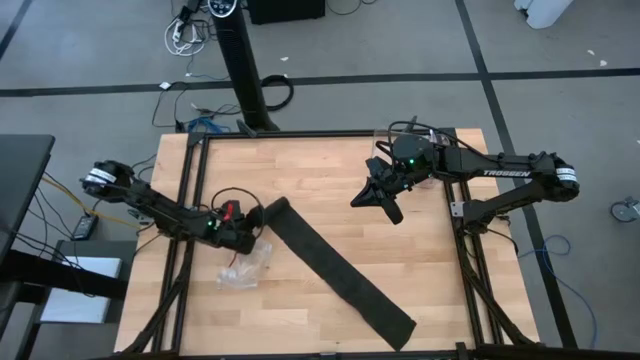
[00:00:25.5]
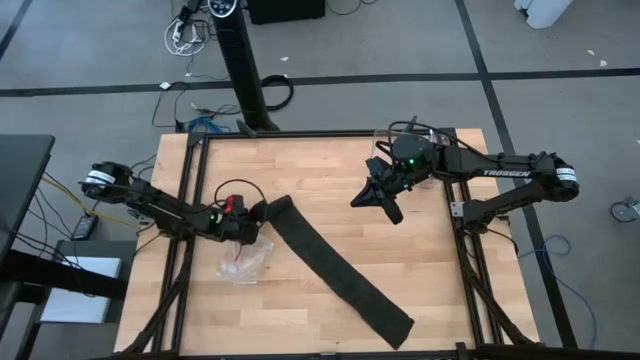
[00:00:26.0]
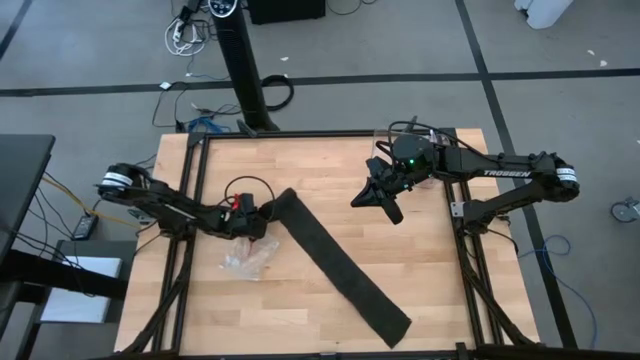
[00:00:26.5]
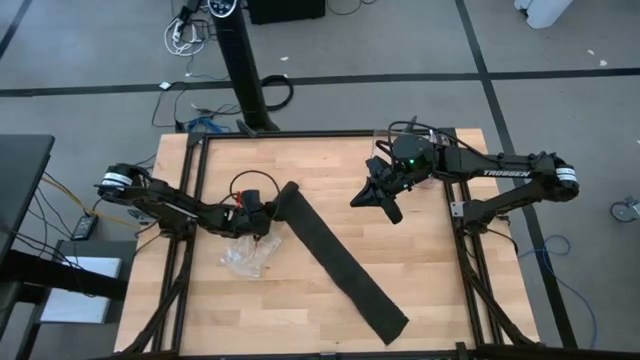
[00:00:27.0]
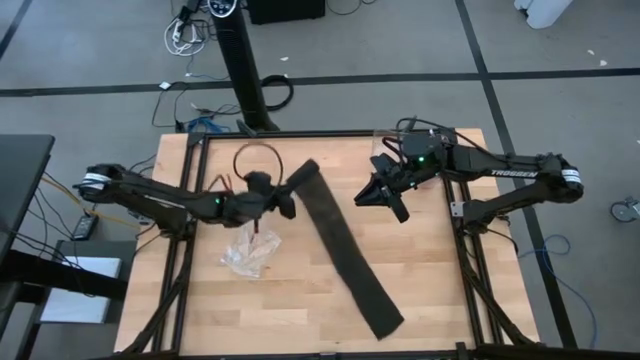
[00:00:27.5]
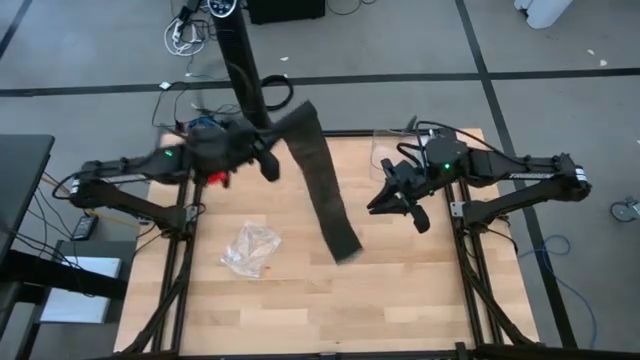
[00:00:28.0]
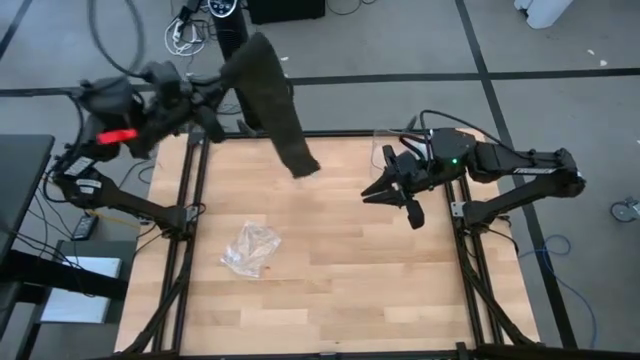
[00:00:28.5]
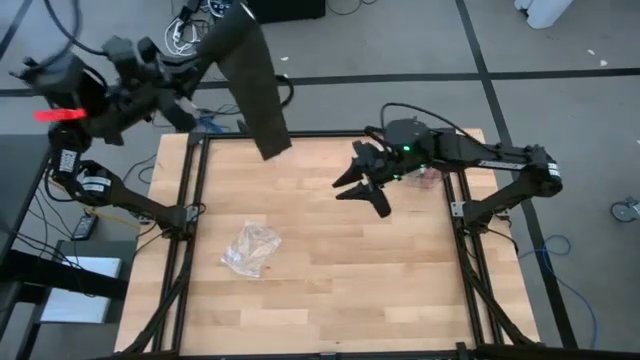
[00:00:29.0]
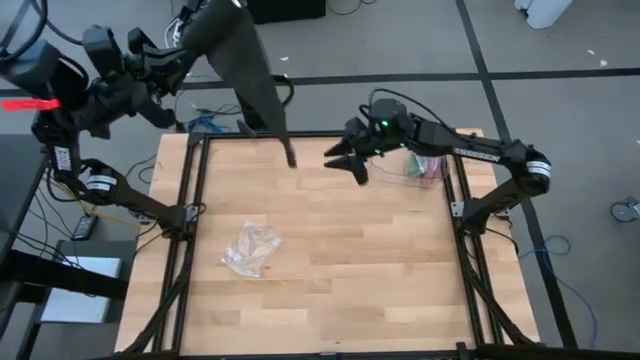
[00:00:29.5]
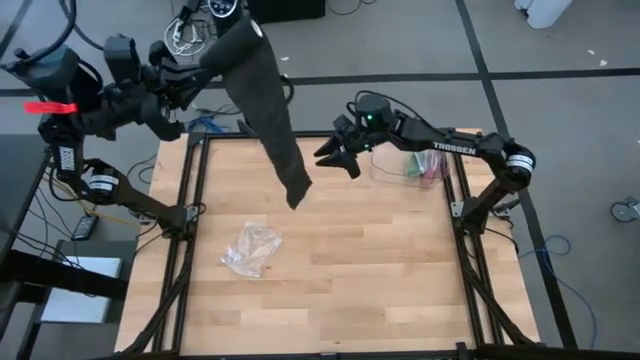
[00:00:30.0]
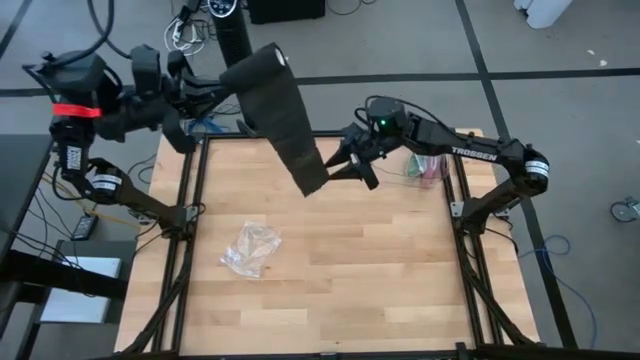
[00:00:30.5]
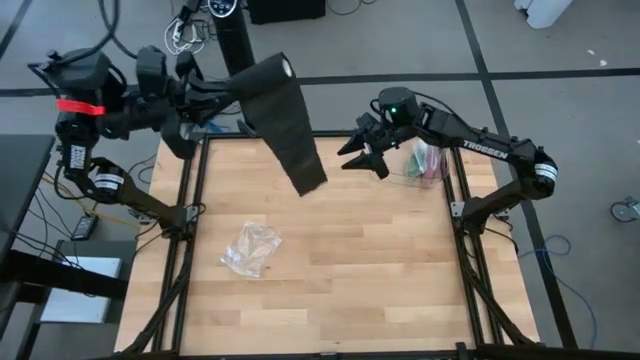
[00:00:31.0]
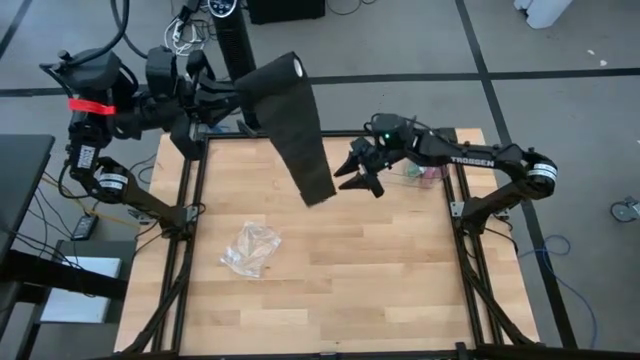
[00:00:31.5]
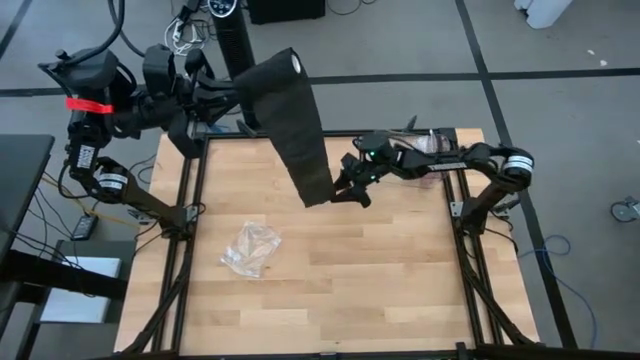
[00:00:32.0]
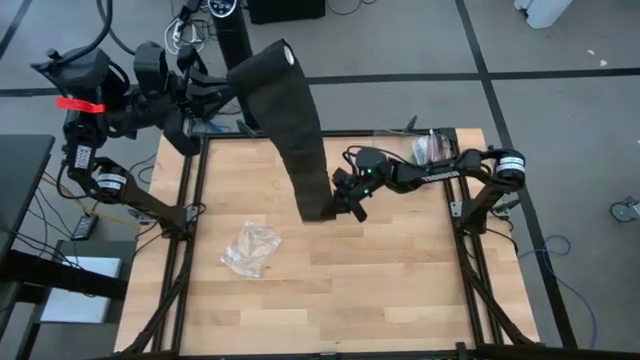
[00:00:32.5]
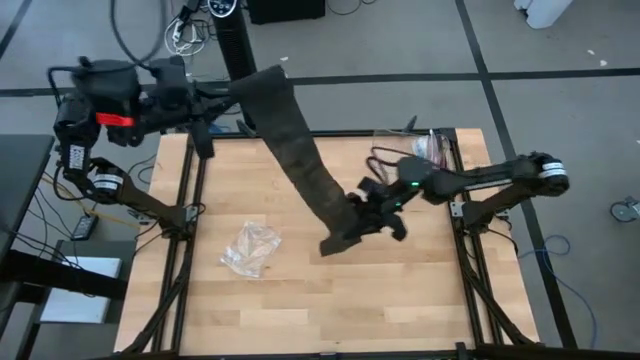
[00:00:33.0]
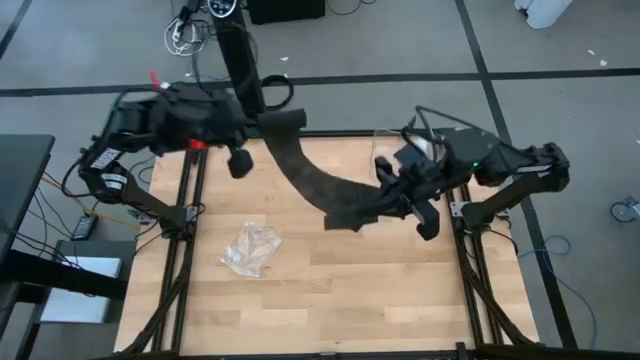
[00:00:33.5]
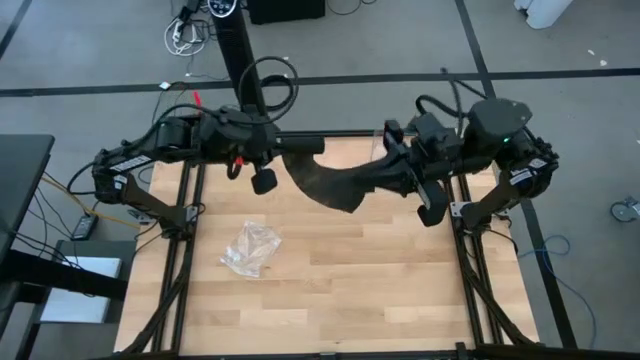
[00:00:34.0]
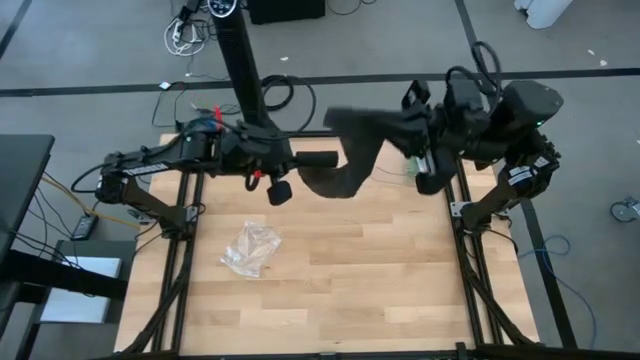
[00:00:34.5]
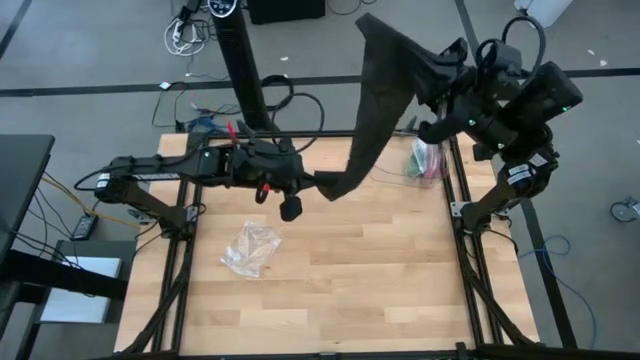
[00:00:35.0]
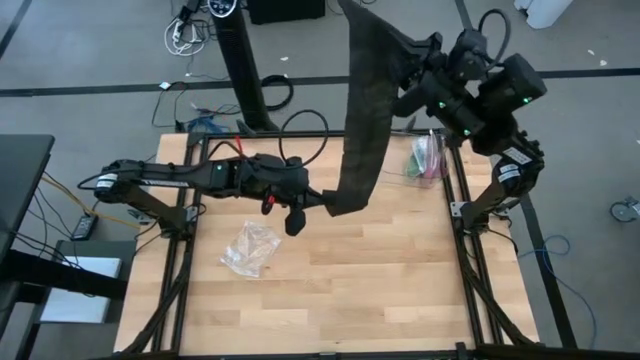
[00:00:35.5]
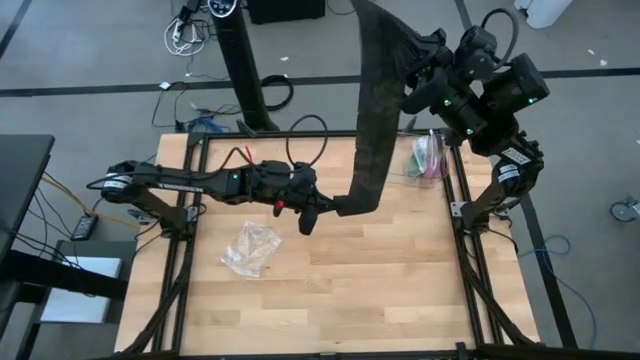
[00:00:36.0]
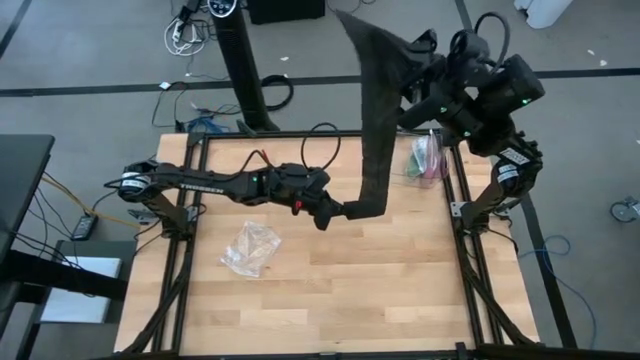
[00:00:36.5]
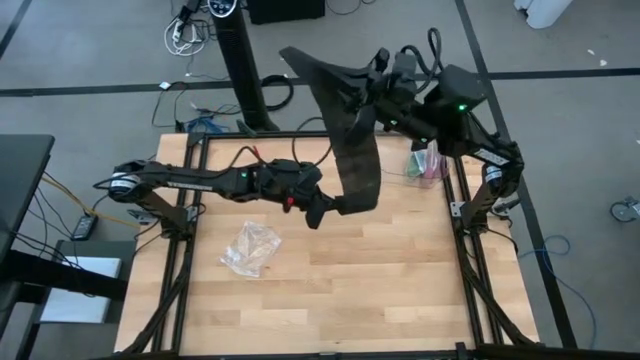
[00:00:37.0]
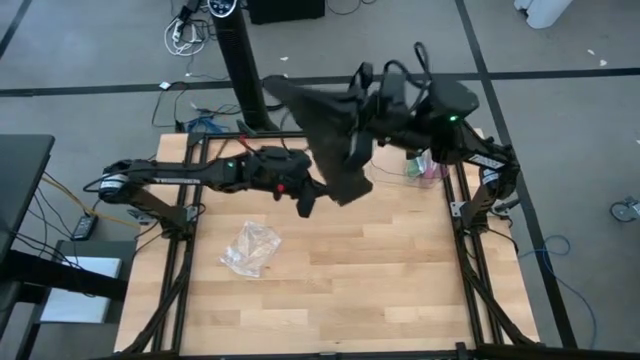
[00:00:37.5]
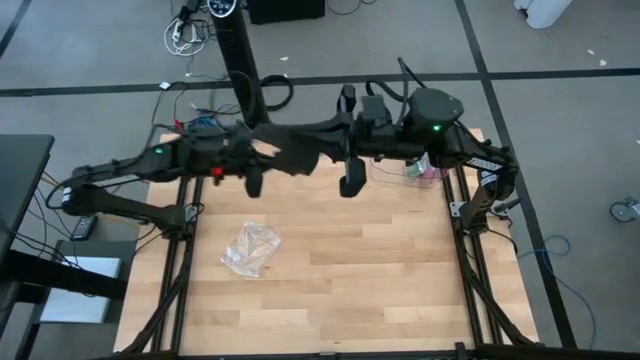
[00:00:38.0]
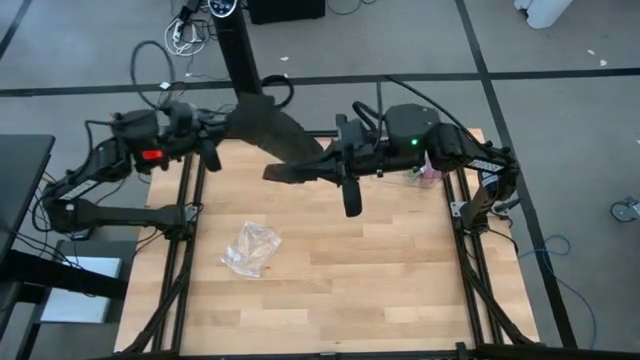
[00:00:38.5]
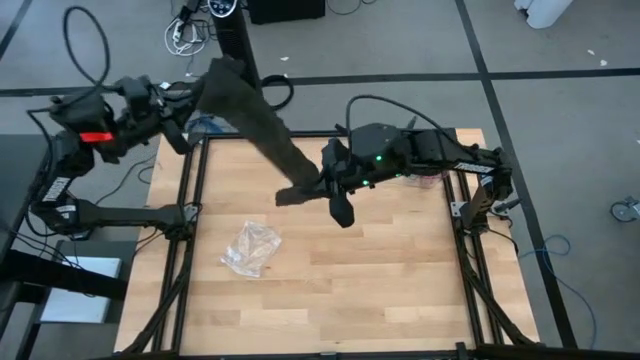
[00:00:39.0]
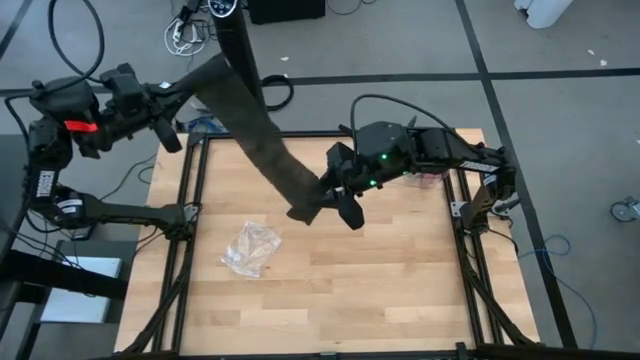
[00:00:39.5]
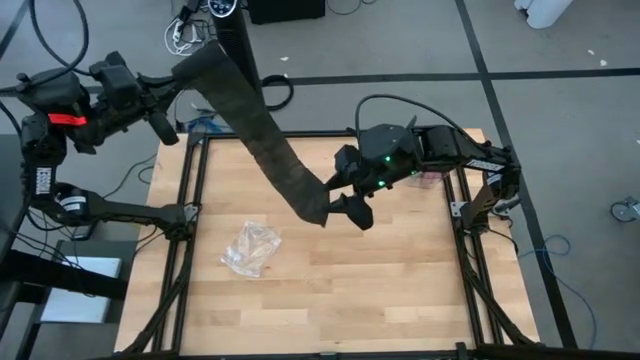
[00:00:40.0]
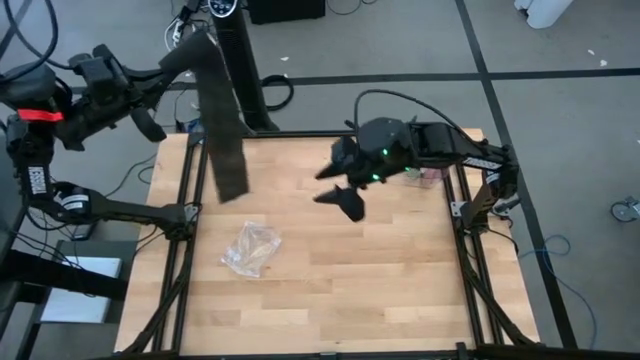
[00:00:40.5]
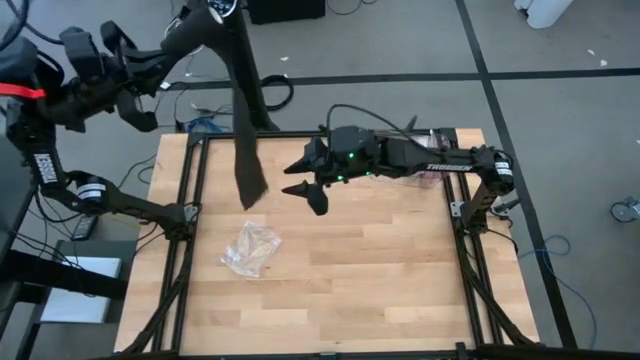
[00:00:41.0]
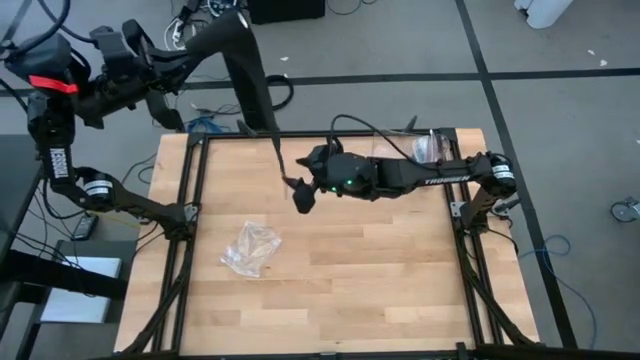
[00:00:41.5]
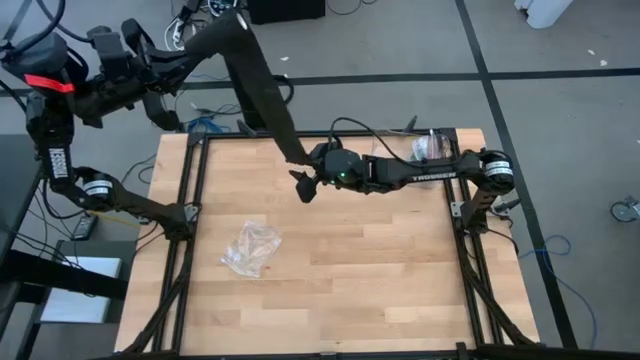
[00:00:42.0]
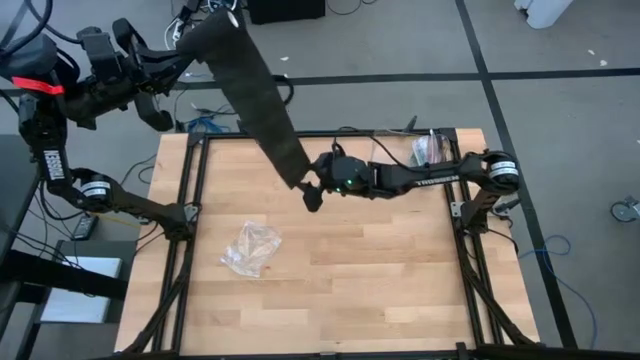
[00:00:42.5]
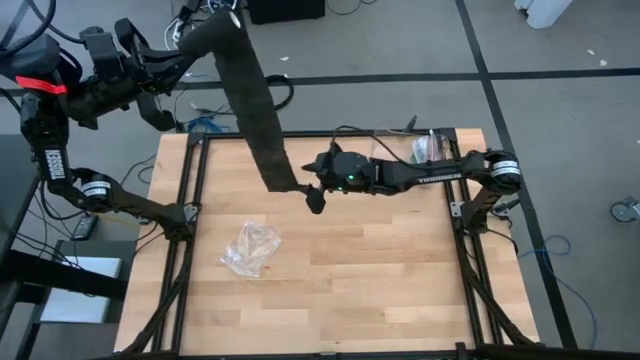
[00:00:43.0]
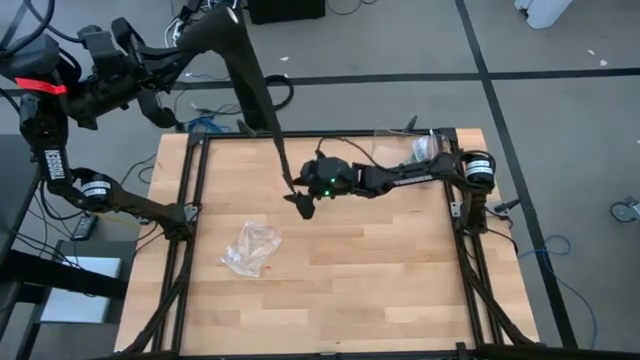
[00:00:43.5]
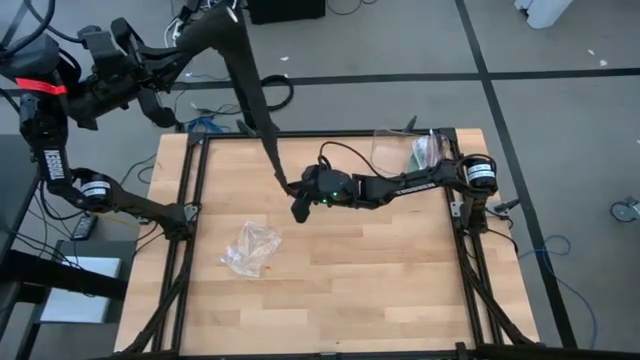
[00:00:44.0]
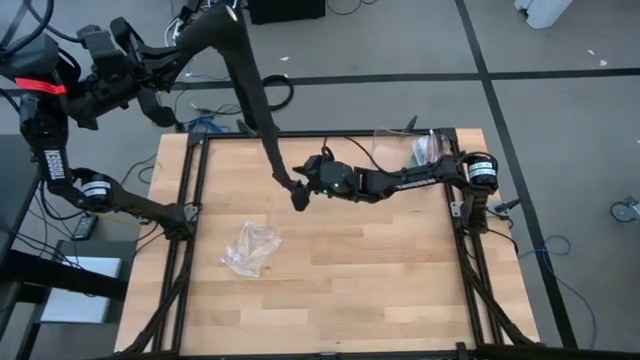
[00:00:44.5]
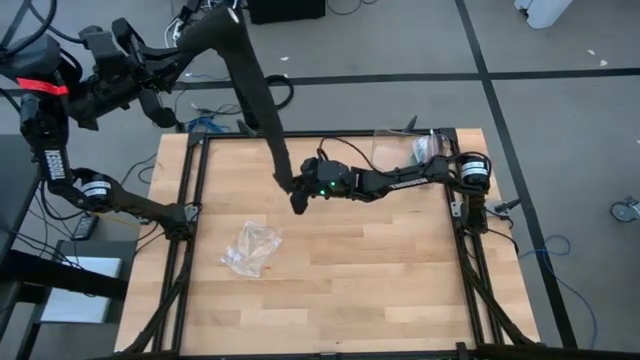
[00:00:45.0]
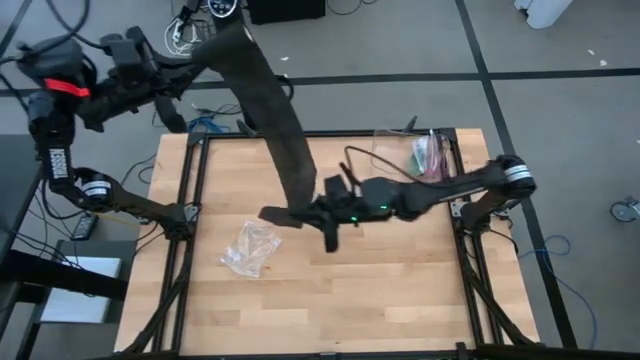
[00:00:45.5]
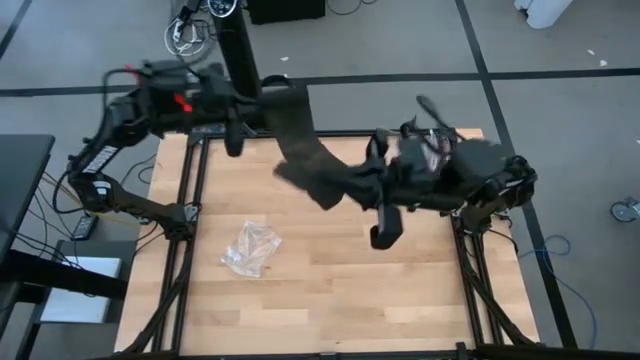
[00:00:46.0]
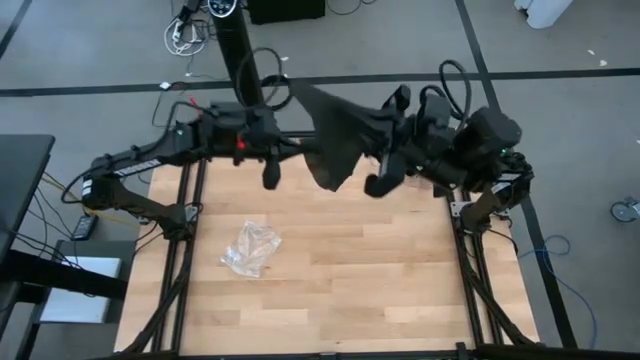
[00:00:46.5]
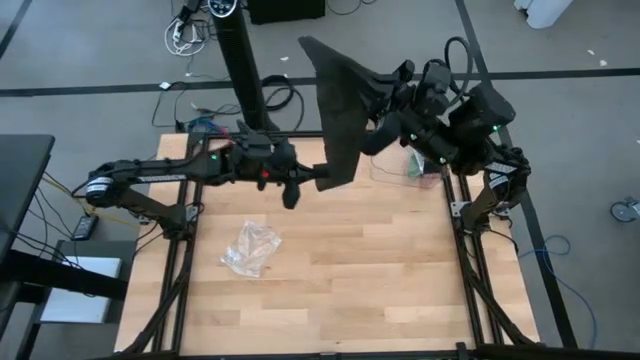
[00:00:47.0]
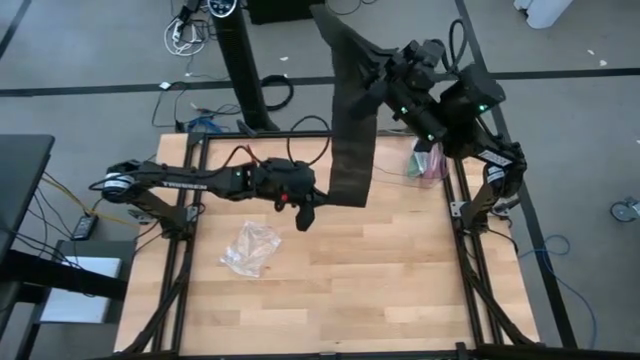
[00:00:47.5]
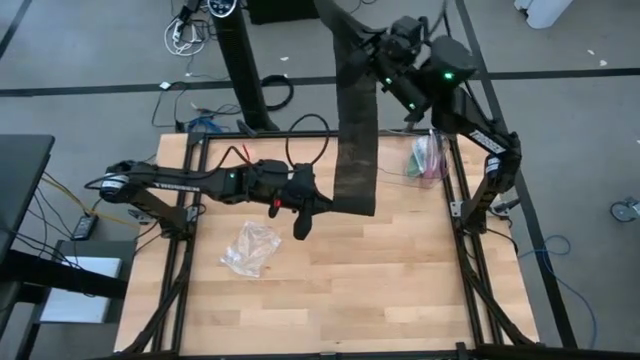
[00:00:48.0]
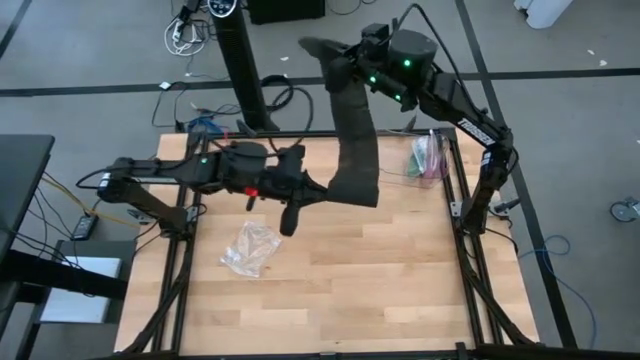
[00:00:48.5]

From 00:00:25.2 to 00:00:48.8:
Task: Roll bandage
Roll the black bandage
